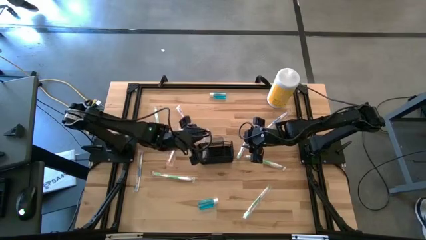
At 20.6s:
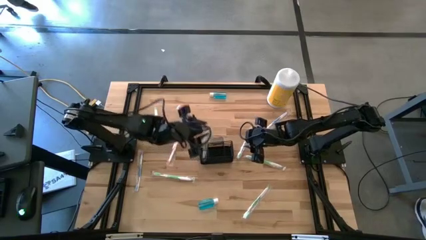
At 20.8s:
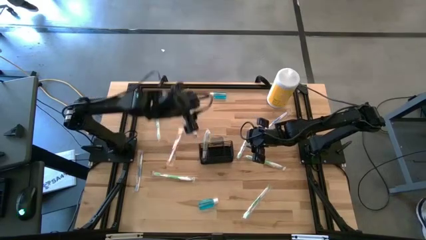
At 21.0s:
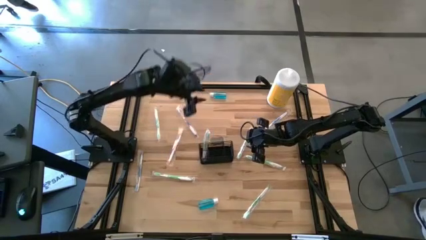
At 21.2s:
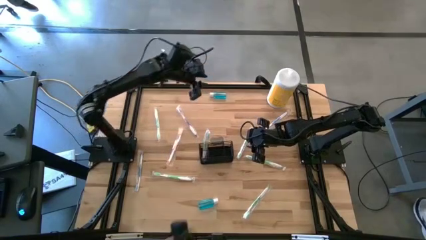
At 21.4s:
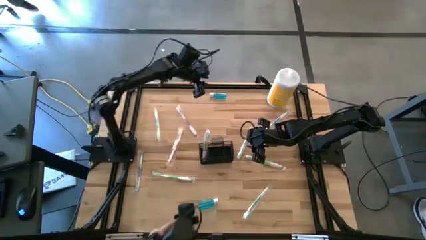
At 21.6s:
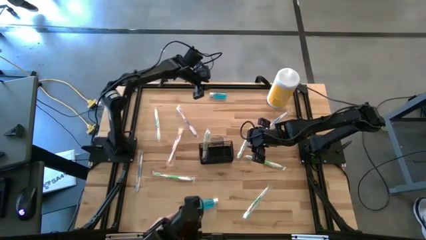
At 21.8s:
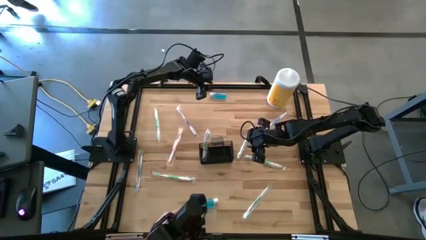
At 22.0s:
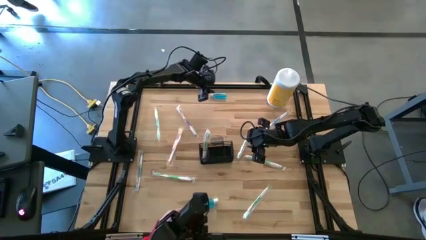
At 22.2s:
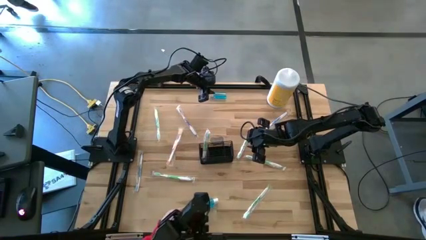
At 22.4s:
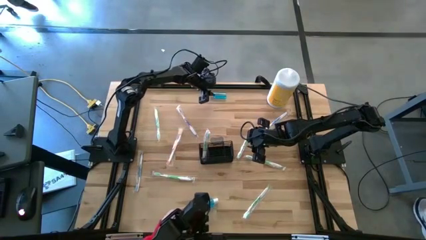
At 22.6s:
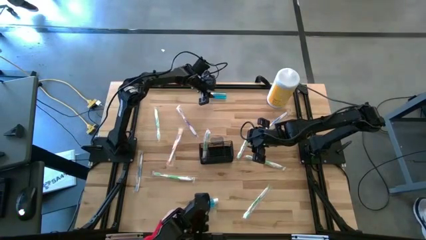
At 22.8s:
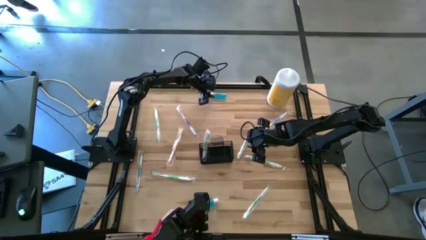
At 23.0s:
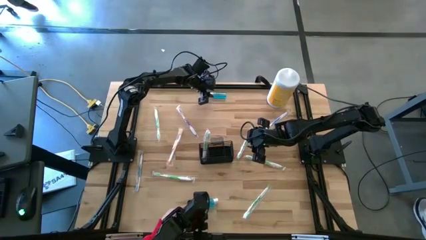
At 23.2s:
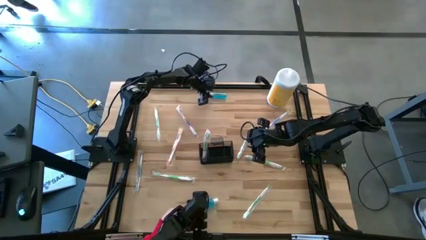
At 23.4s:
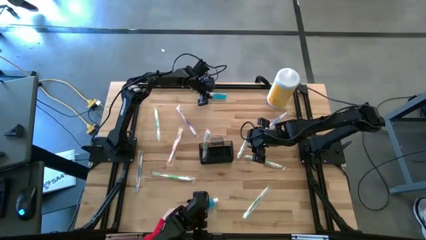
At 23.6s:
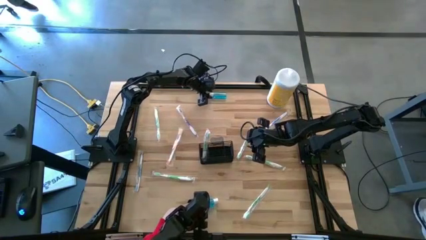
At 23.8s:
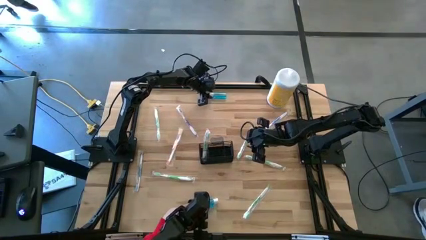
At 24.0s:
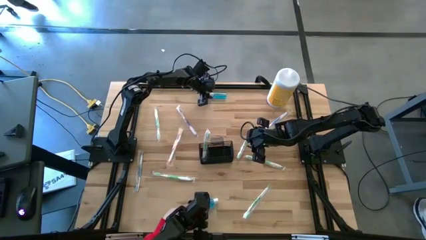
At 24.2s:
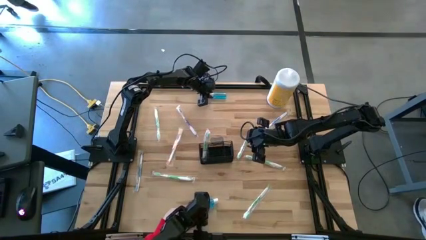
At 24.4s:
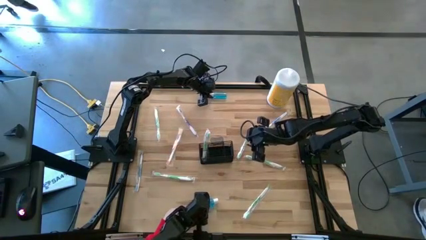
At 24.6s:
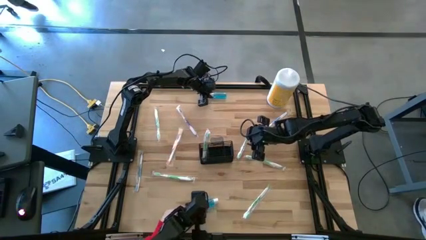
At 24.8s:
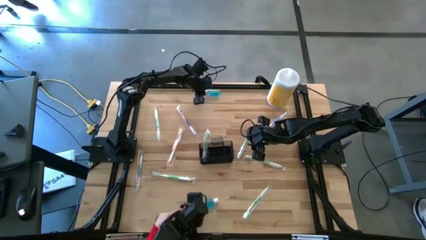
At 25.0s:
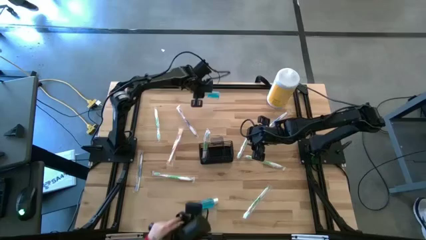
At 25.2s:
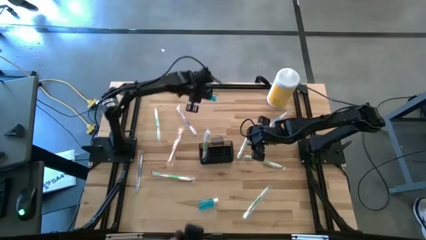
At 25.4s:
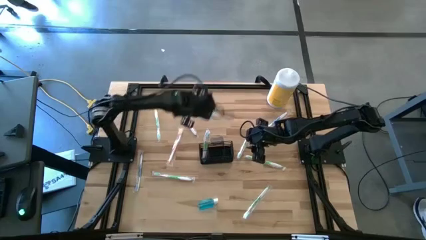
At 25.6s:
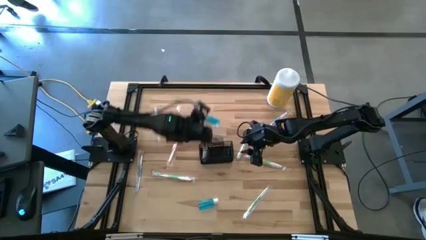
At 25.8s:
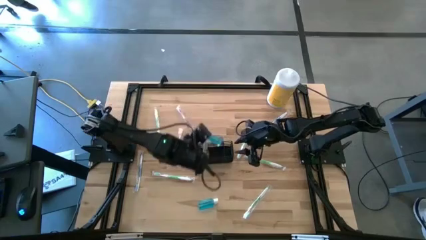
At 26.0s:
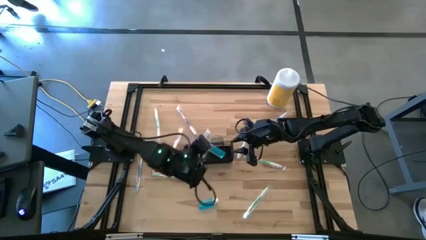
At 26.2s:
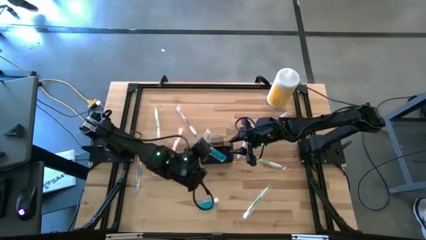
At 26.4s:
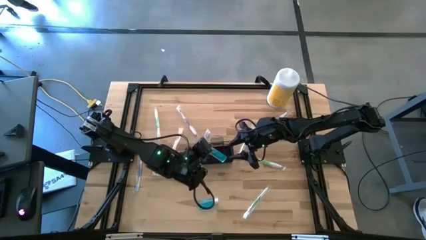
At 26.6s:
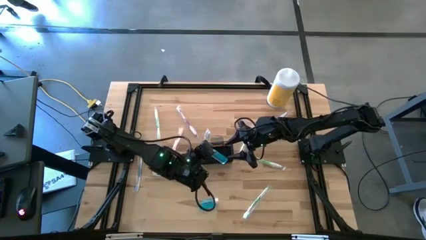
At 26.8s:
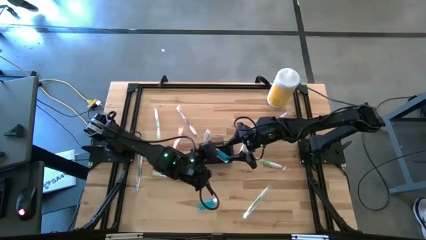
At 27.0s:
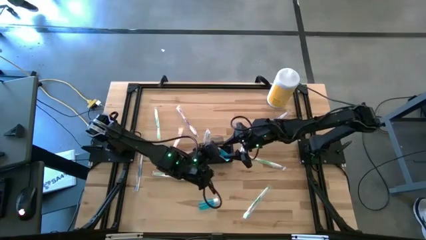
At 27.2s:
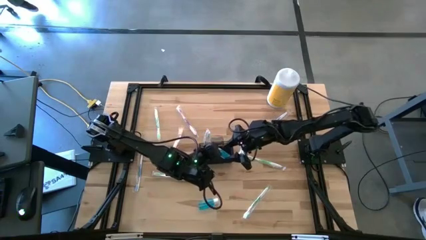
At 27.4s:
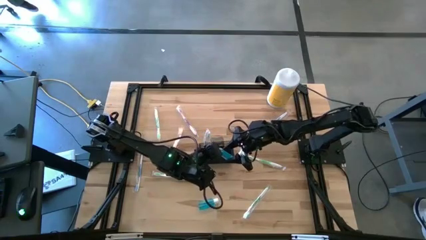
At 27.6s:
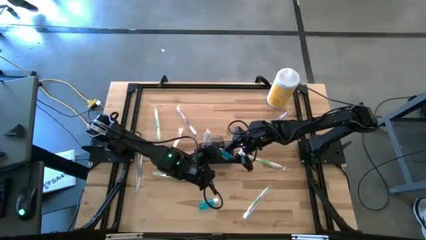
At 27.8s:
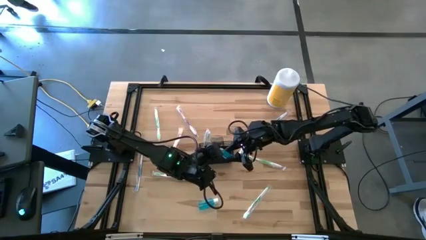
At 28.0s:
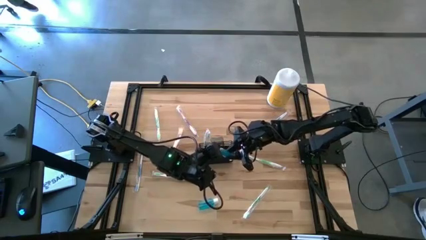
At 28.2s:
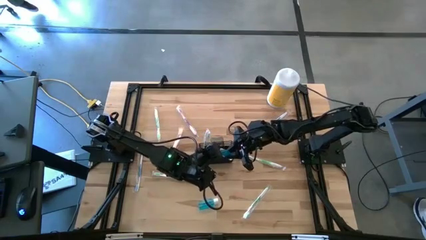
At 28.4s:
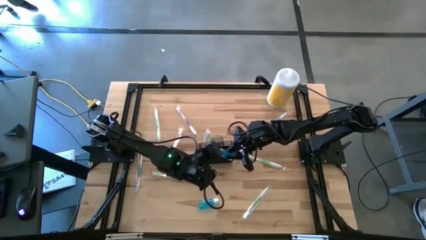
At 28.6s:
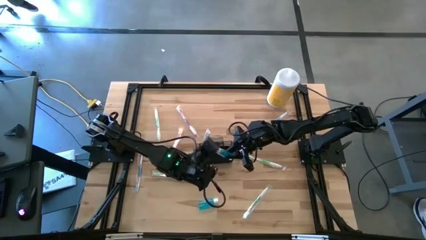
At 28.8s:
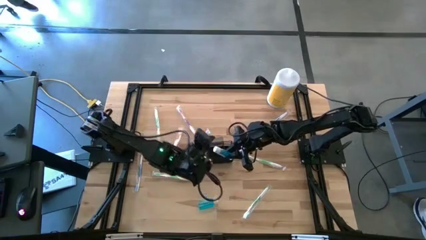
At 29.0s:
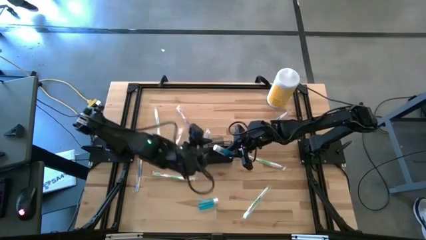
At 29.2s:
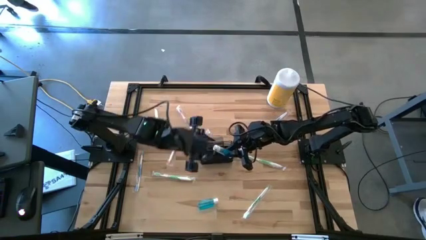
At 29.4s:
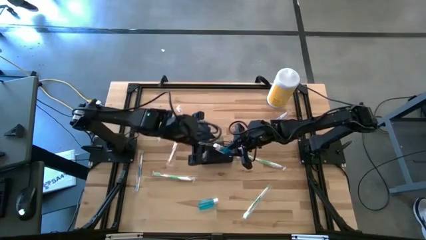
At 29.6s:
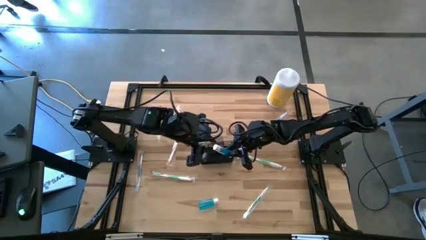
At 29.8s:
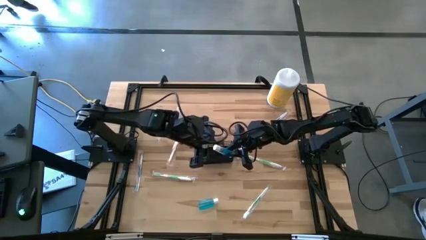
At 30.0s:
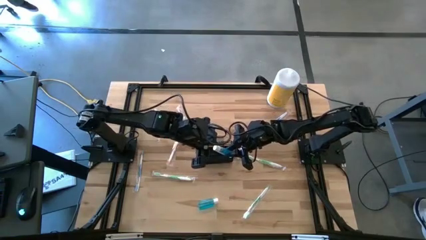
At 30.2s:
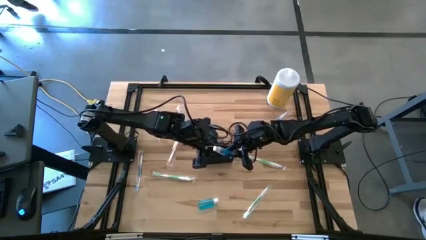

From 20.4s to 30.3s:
Task: Pick & Place toothbrushing station
Put the top blue mouthwash into the black mesh organizer

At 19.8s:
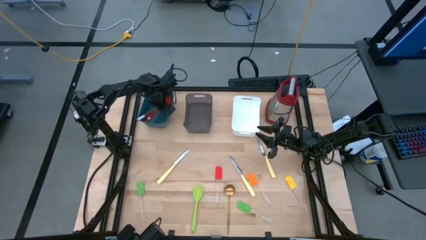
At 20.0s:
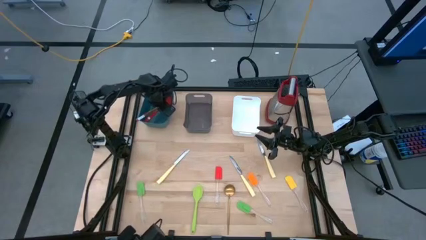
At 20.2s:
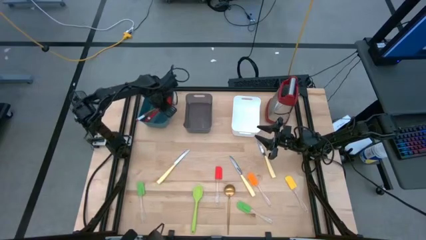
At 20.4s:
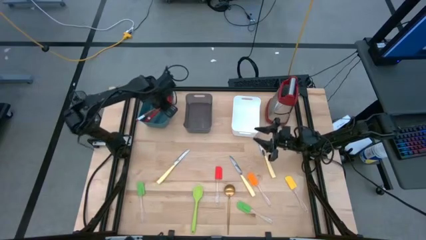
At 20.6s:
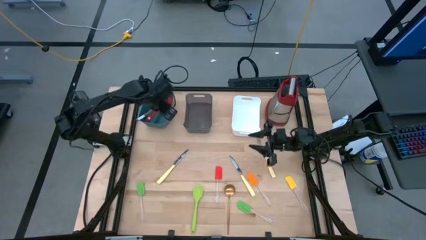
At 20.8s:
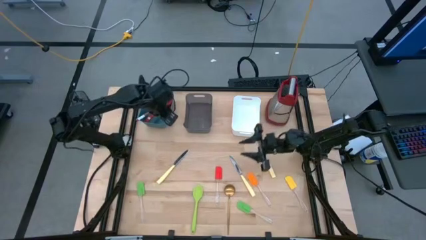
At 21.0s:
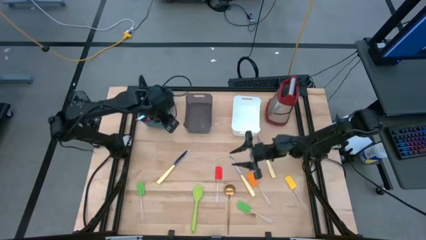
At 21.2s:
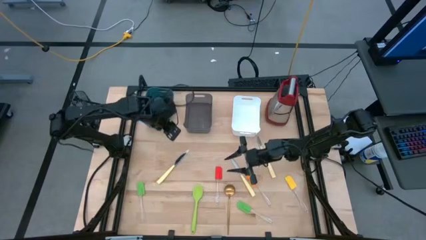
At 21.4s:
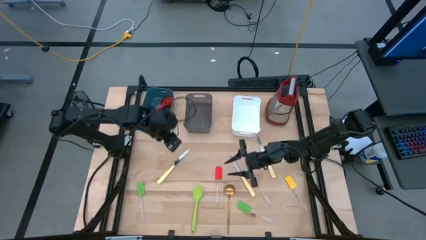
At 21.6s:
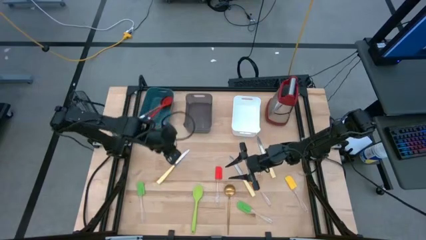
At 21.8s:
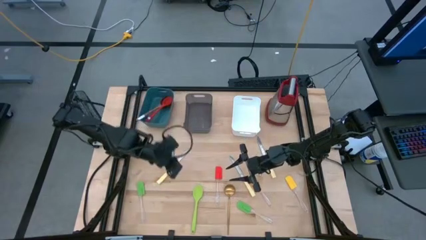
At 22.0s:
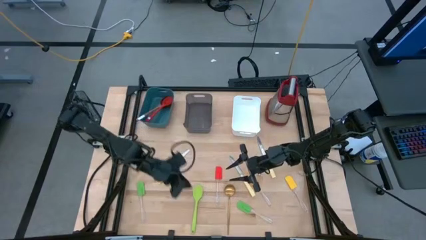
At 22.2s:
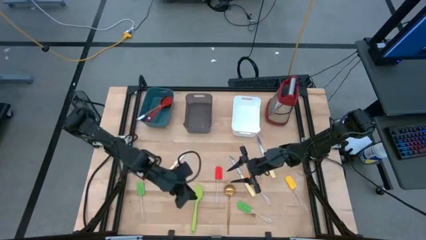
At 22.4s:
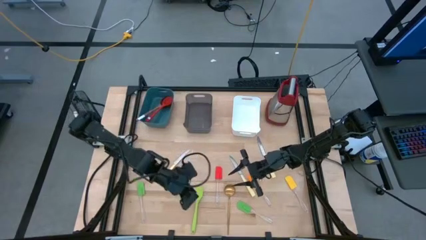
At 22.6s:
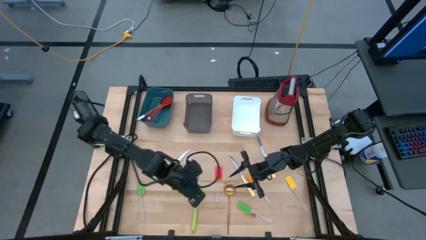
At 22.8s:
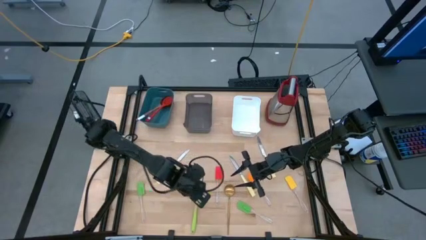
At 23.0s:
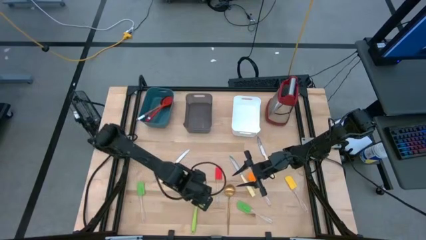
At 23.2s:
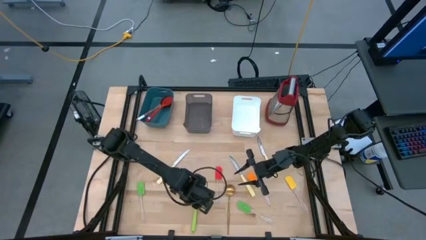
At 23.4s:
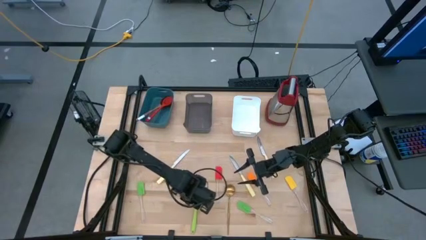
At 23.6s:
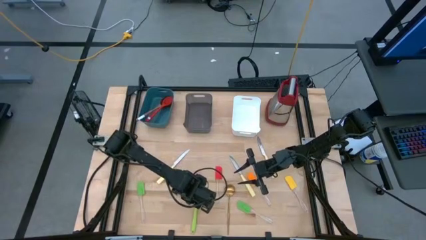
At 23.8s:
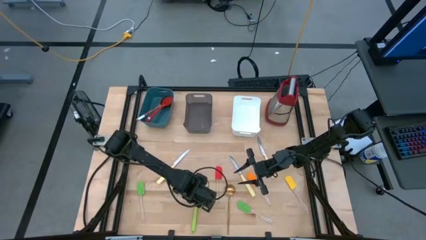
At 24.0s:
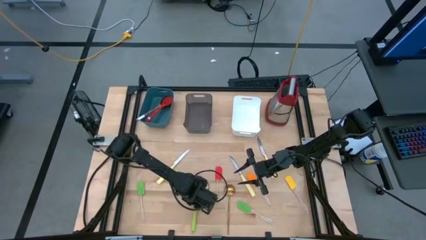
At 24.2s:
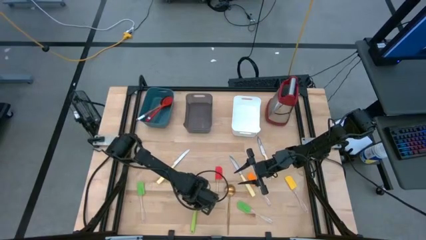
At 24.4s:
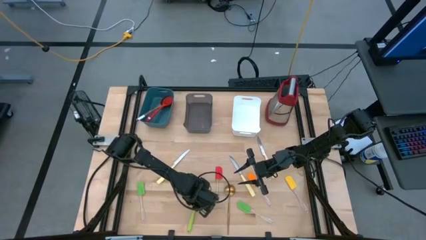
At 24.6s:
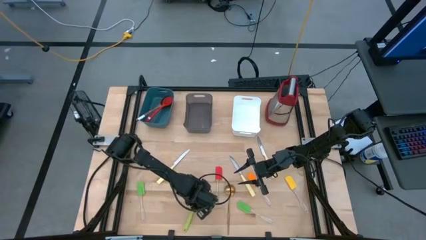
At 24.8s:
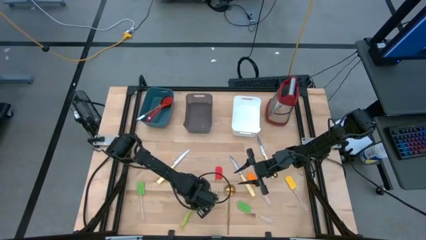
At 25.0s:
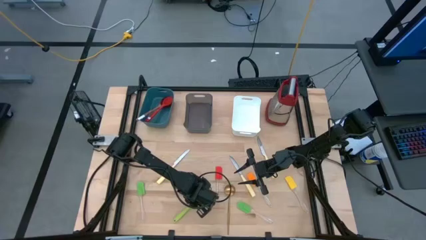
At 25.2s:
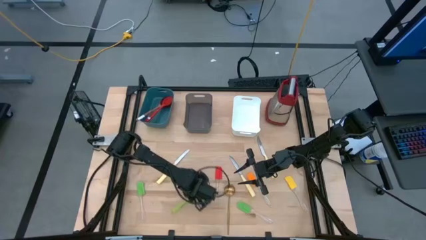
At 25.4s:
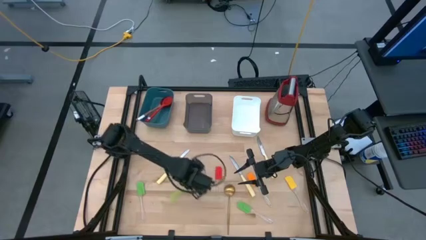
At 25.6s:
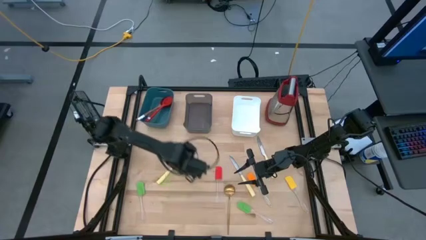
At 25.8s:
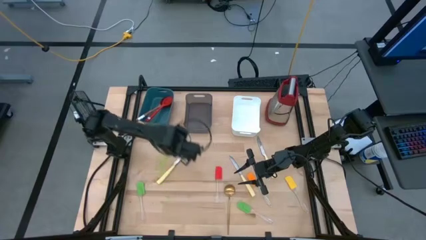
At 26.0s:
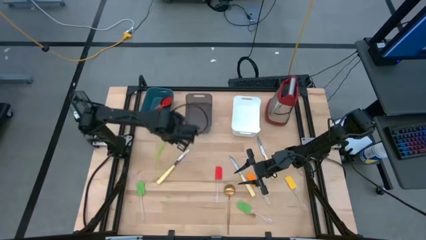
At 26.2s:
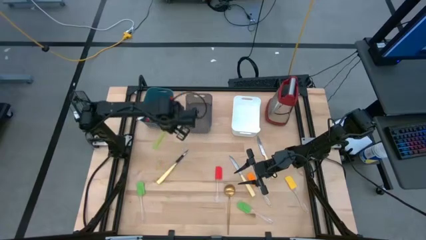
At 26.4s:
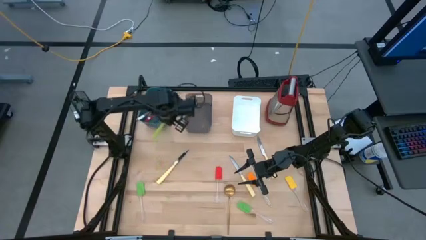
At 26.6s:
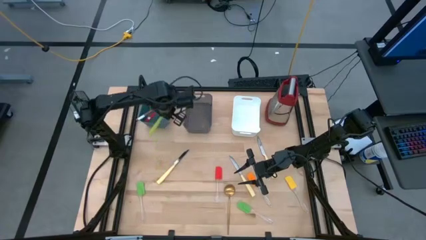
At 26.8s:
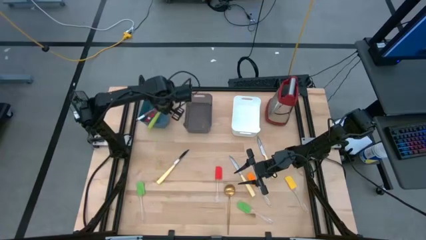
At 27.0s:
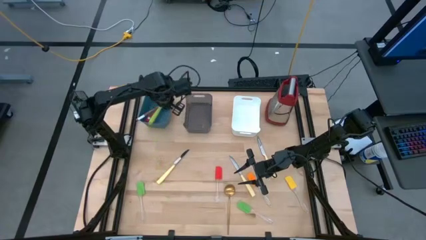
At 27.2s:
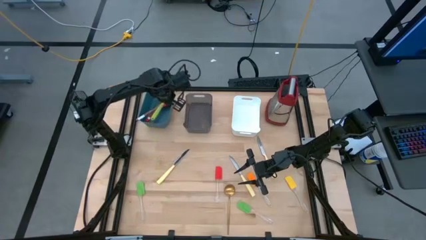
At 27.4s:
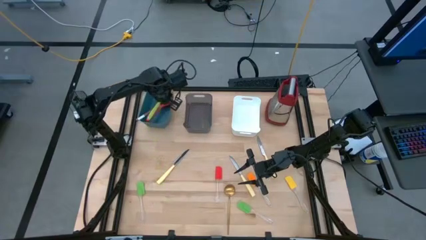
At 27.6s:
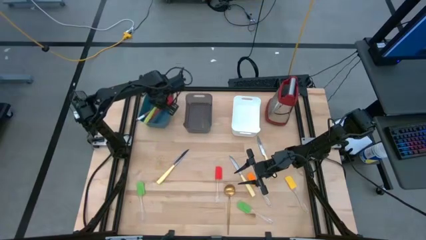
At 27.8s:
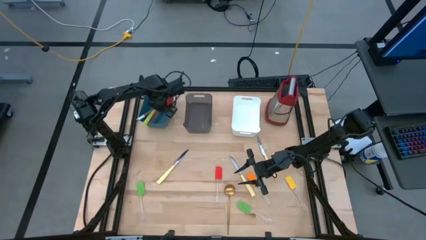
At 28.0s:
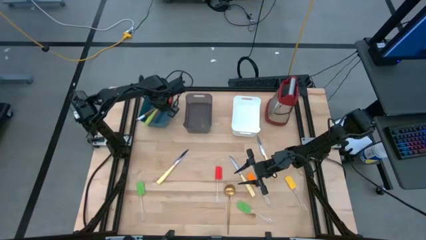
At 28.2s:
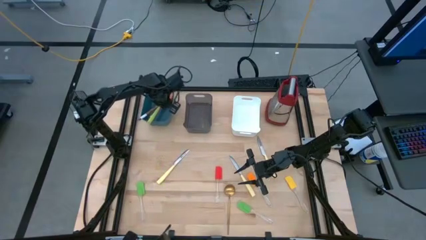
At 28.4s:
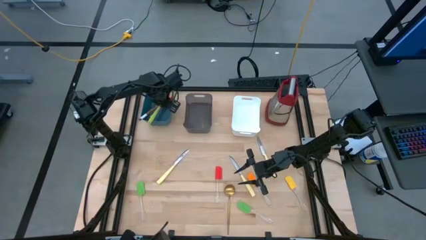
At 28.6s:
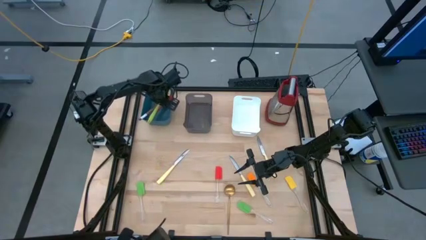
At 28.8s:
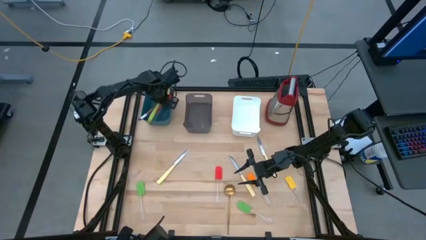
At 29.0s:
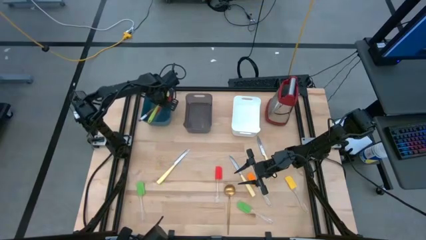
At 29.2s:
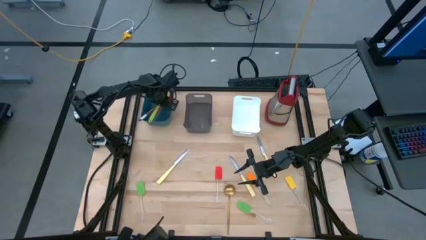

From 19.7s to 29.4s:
Task: Pick & Place Kitchen Items
Put the green serving spoon into the blue bin
